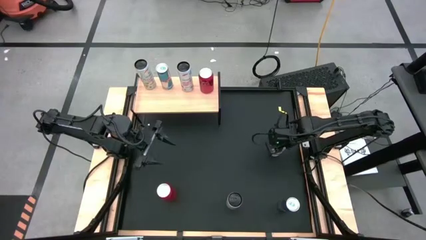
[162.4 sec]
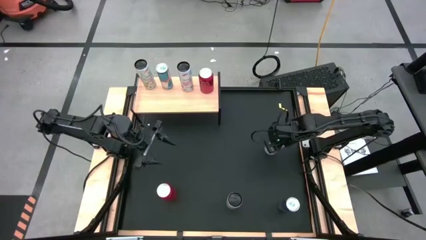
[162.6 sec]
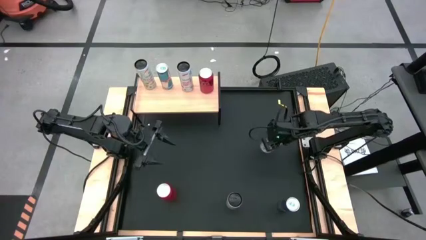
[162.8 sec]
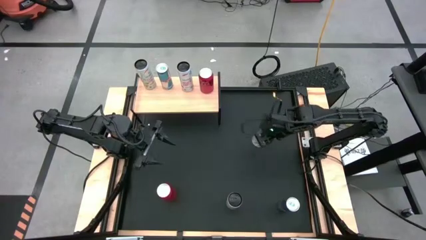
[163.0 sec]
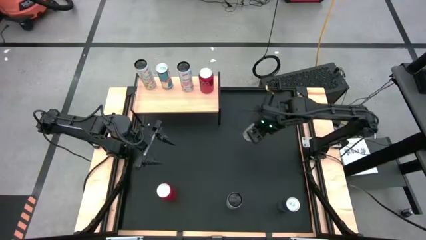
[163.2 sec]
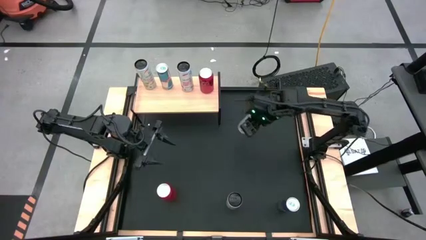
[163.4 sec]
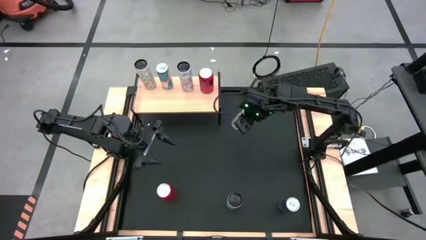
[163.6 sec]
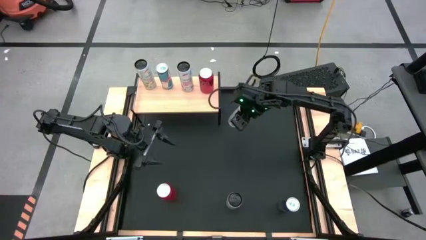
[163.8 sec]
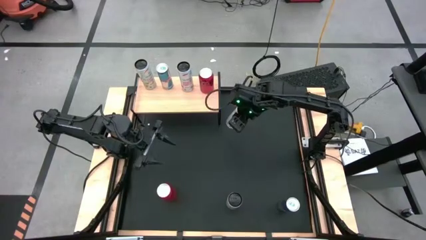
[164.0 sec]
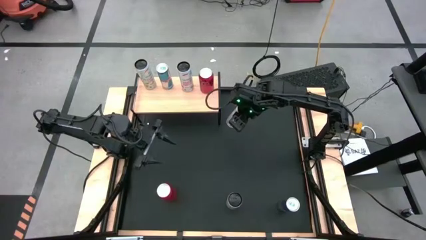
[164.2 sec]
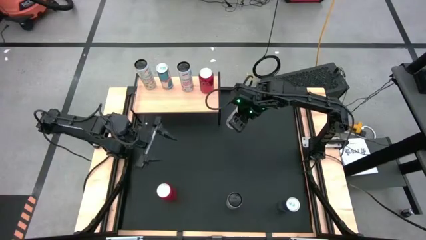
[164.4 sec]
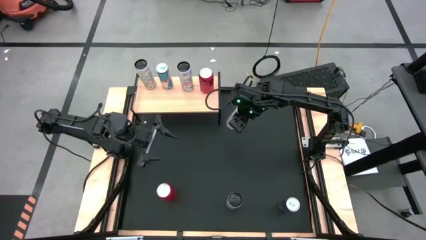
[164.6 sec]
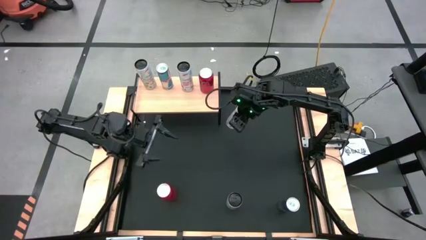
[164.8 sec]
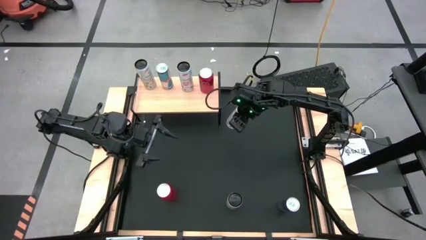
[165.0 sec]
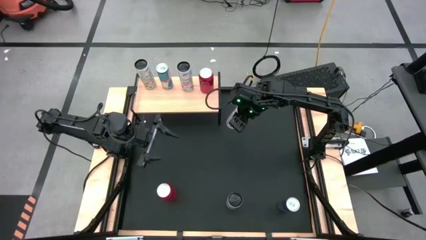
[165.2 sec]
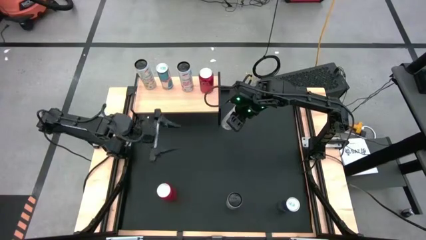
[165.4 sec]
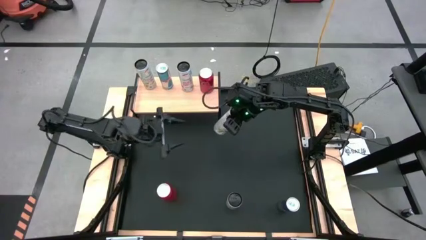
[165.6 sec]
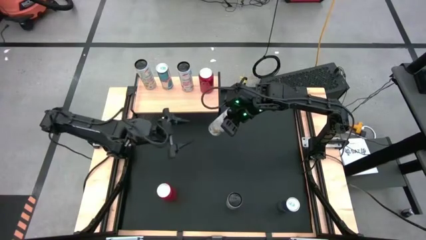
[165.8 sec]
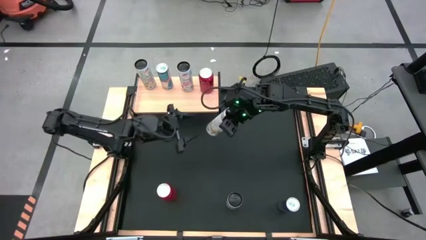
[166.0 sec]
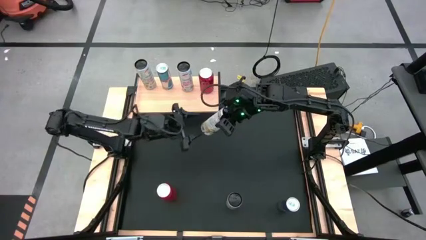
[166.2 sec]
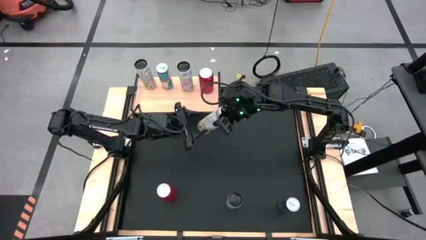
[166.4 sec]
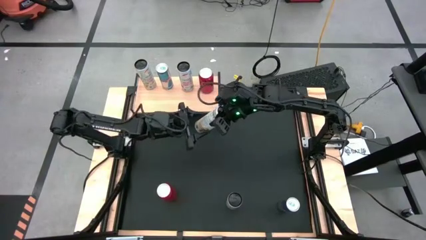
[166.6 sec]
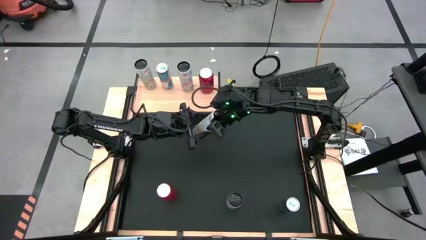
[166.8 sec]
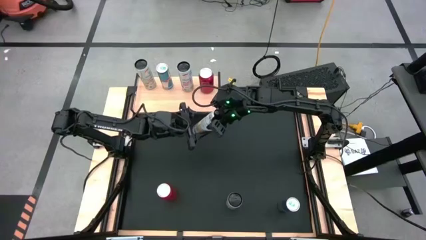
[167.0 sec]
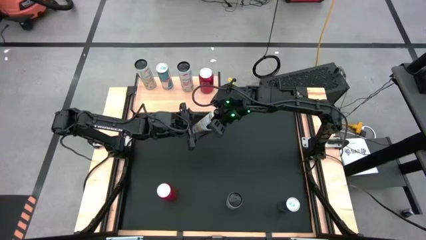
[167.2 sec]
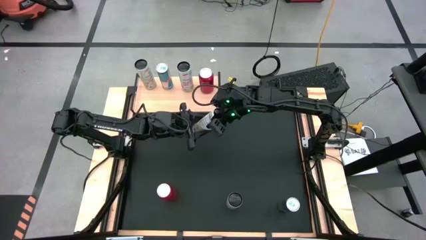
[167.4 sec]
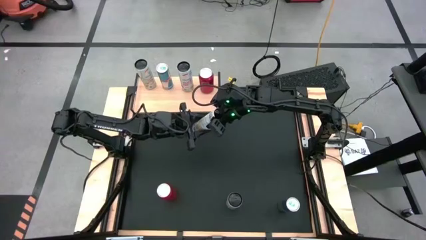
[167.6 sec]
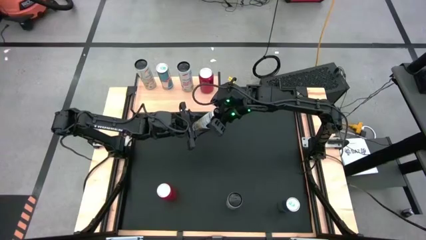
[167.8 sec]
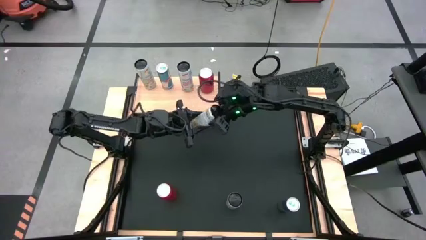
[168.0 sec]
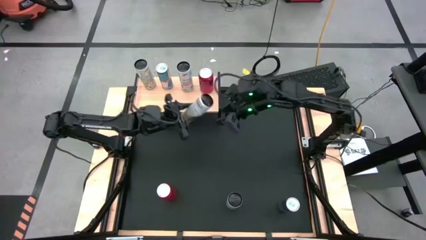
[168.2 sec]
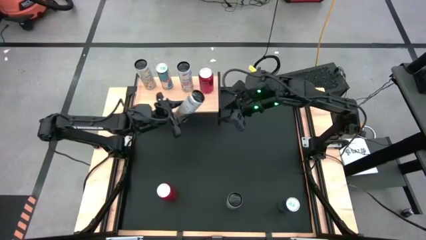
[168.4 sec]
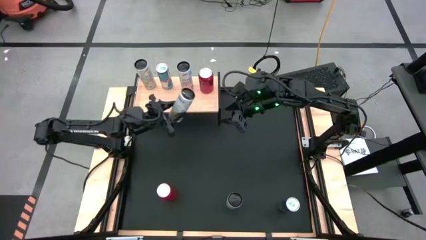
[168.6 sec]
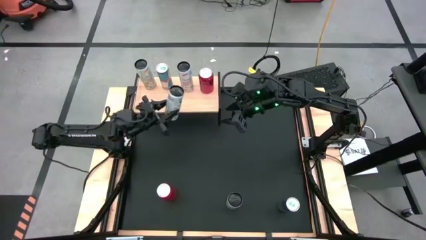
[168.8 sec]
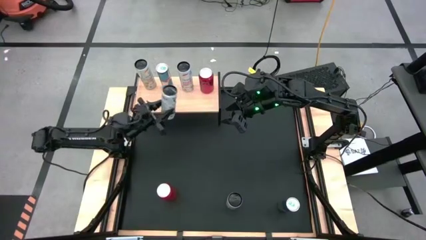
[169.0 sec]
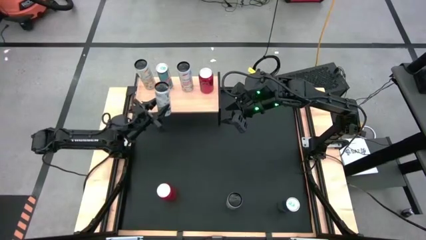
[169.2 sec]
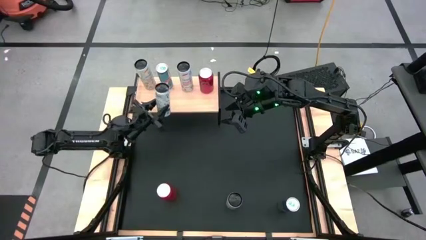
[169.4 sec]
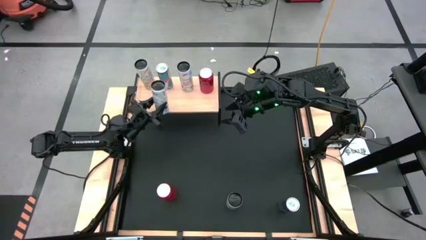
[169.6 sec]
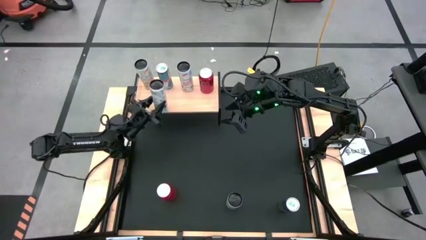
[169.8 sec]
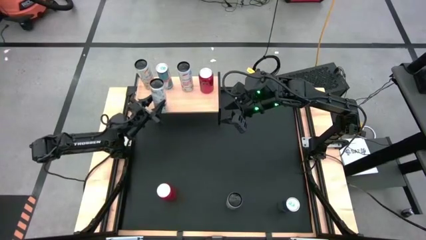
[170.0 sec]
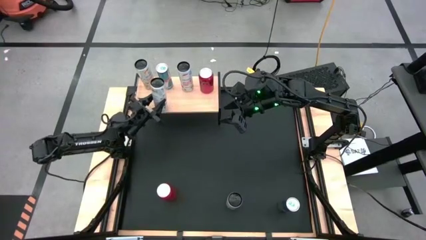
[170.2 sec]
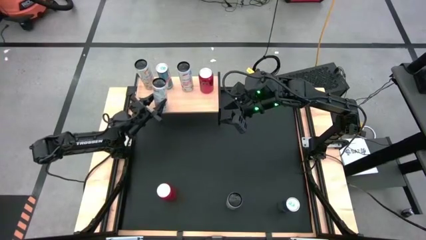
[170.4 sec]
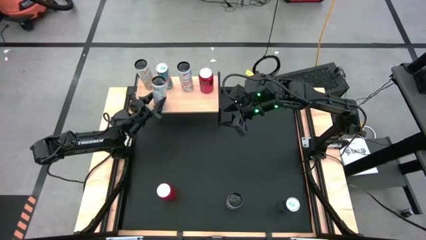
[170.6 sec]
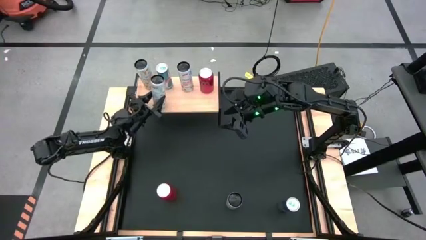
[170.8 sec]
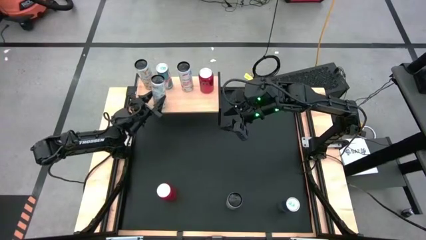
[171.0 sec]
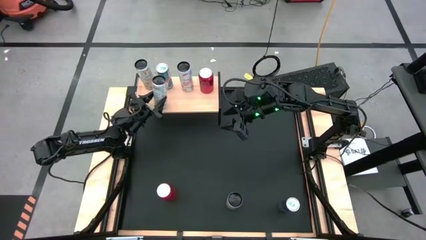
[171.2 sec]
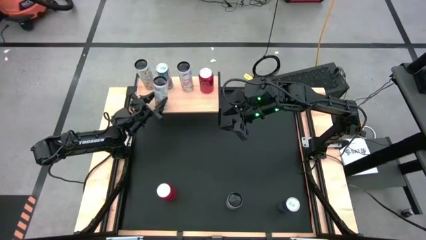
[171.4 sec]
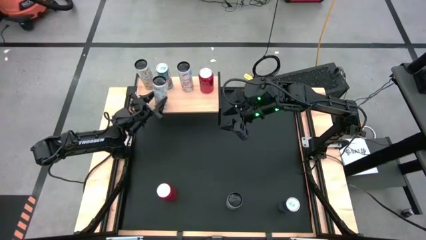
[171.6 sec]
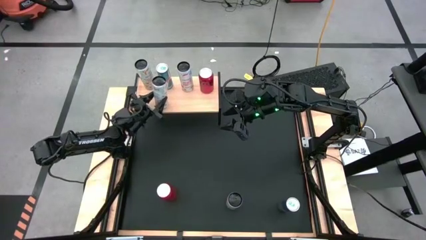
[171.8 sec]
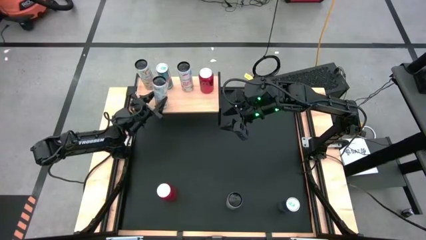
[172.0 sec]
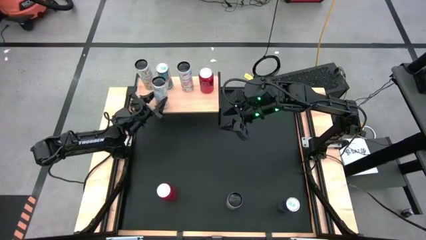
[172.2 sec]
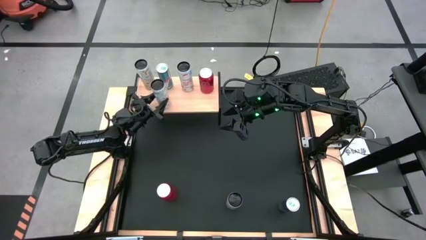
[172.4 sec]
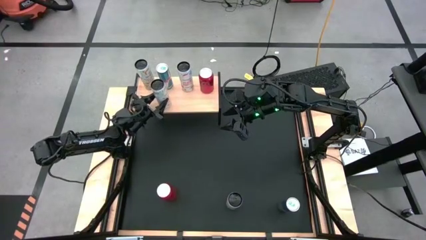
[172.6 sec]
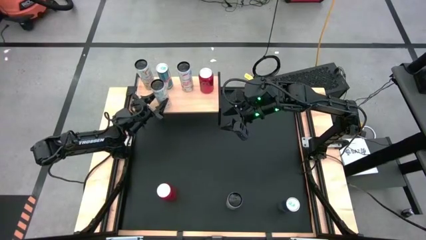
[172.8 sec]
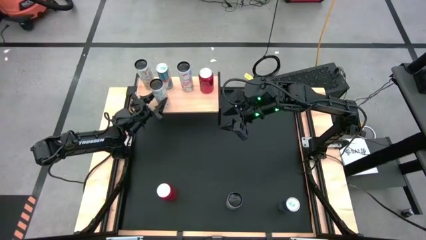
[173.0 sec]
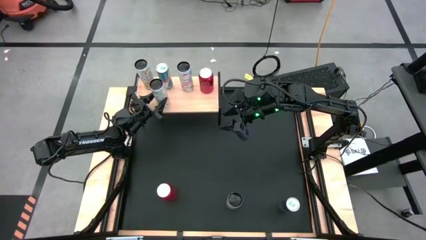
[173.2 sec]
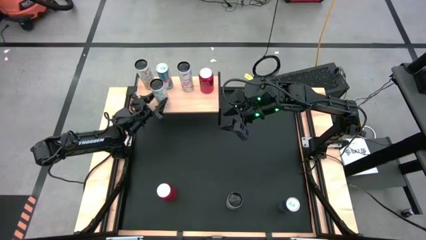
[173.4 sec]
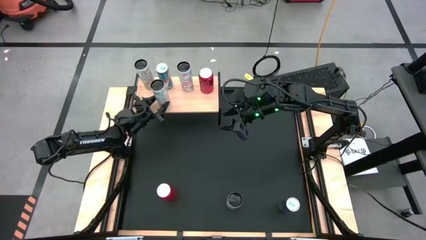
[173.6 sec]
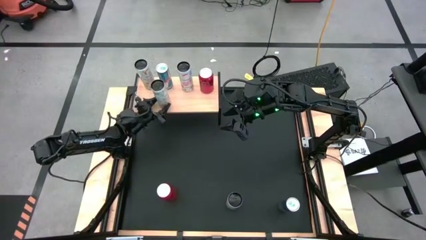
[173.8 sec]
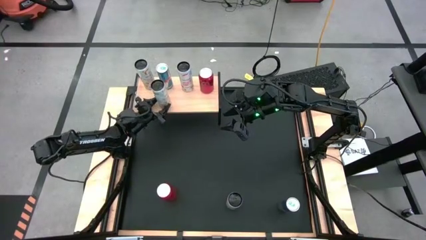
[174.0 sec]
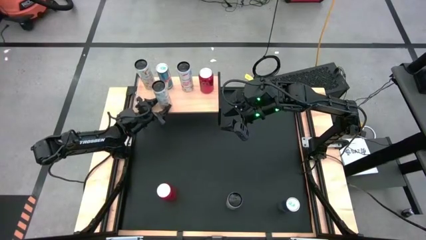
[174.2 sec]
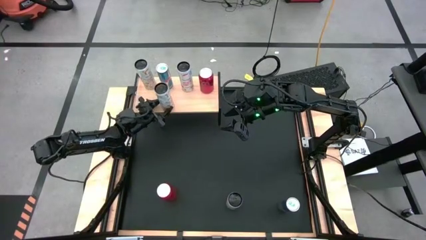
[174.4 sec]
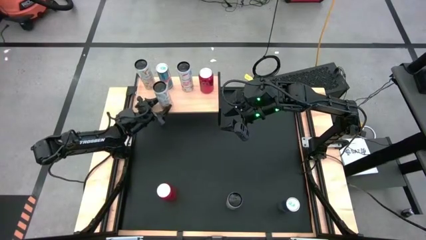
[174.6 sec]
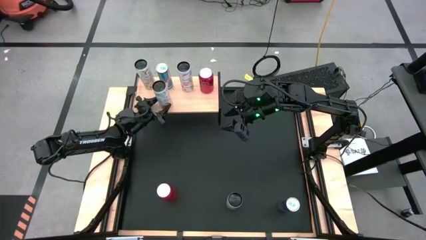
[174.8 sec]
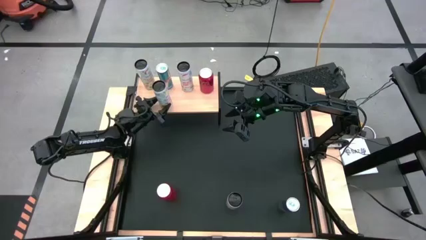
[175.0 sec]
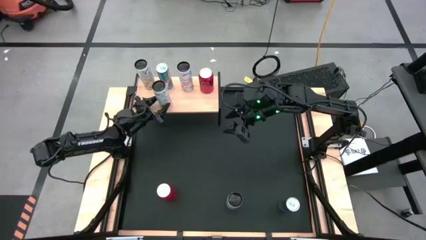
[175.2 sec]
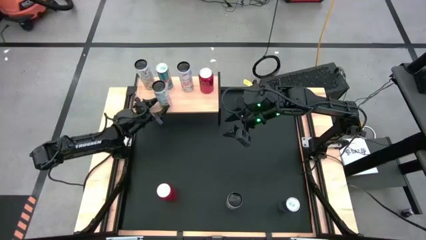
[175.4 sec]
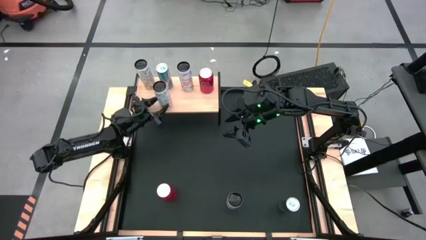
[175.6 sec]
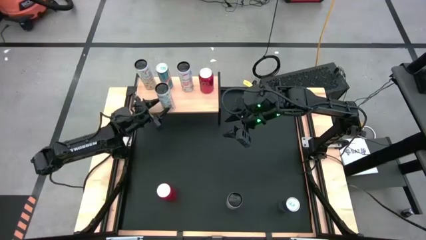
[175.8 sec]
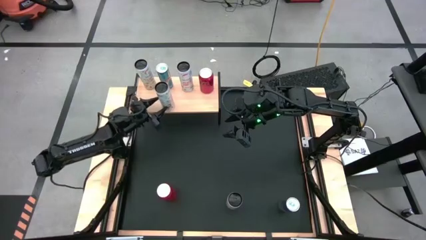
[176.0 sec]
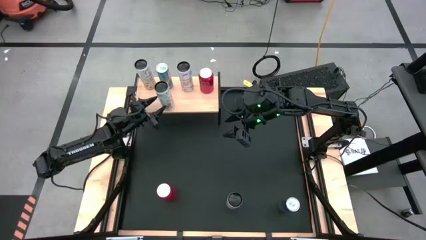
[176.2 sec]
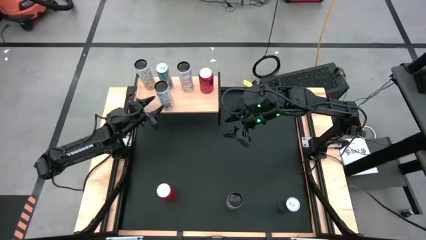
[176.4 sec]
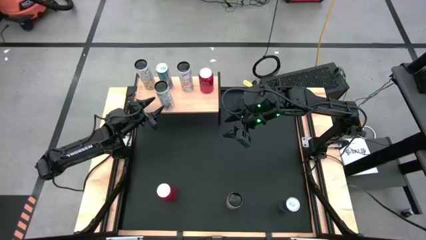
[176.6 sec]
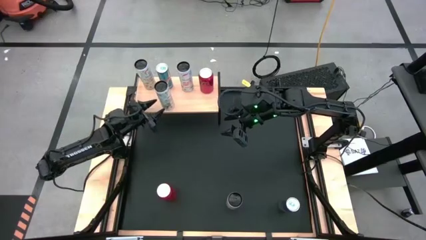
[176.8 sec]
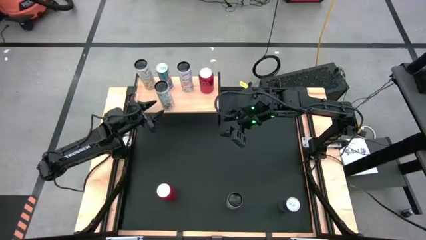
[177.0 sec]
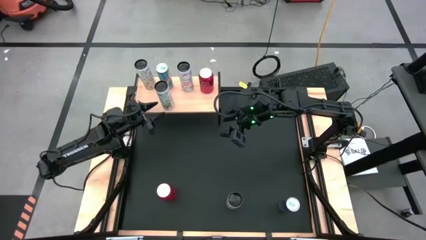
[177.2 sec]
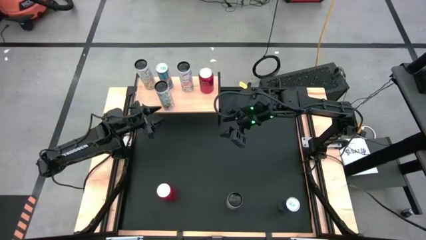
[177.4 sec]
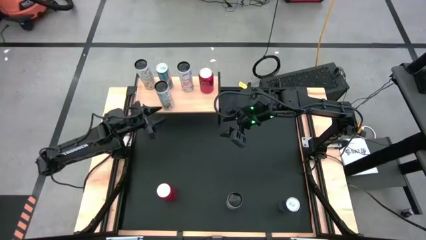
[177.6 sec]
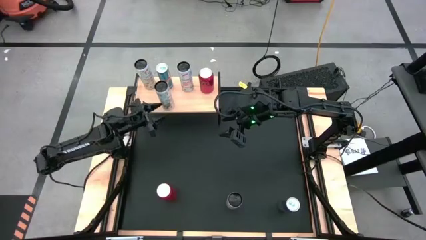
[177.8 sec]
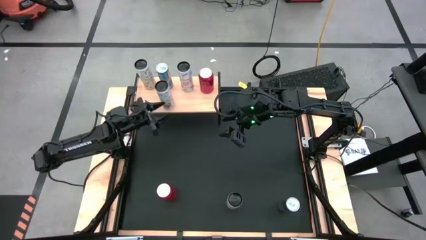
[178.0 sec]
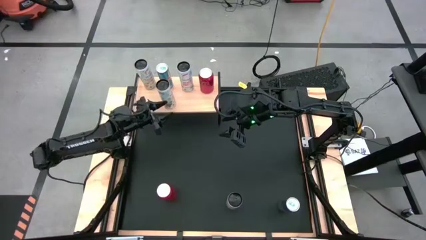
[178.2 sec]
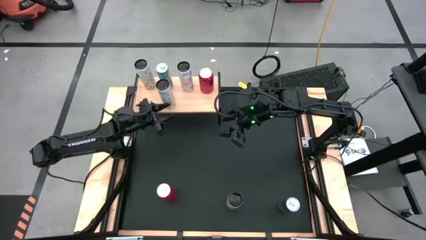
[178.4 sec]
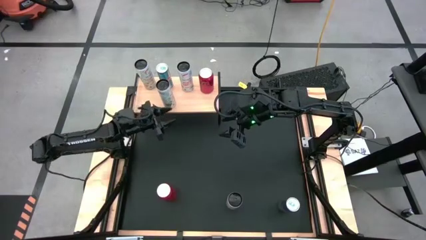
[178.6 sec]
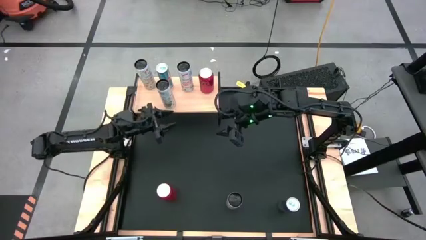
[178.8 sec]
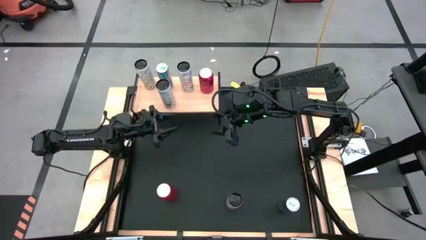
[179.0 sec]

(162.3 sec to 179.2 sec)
Task: Place canned beverage on shelf
Put the white yellow soda can on the shelf aligned with the white yellow soda can
